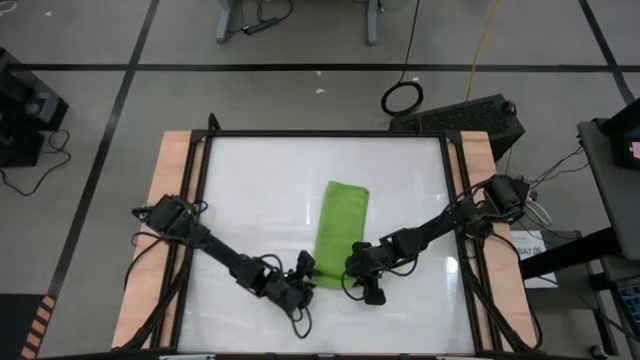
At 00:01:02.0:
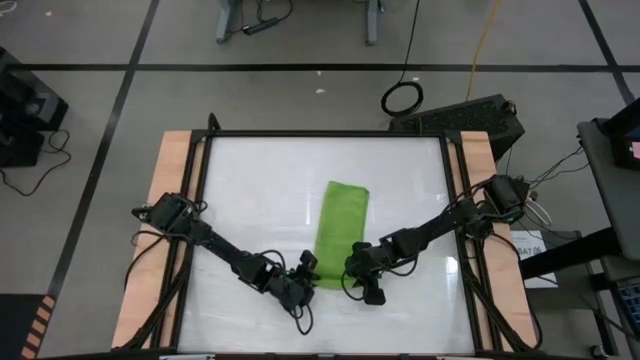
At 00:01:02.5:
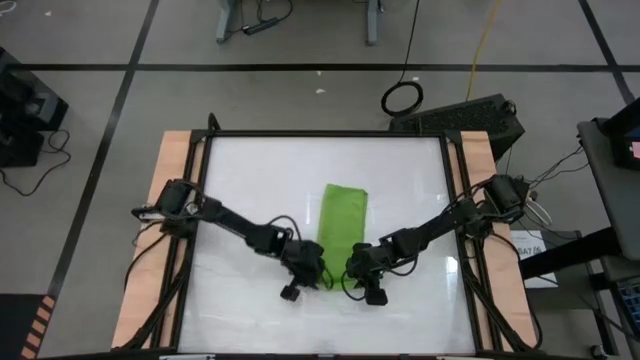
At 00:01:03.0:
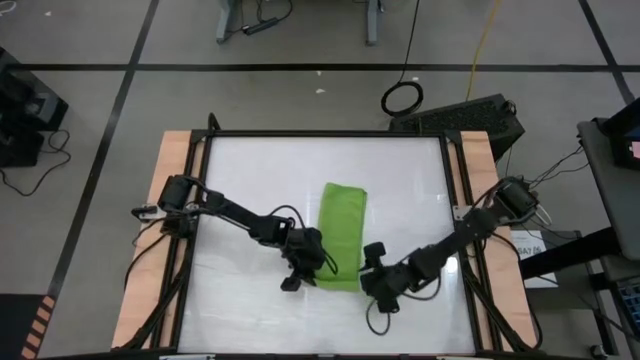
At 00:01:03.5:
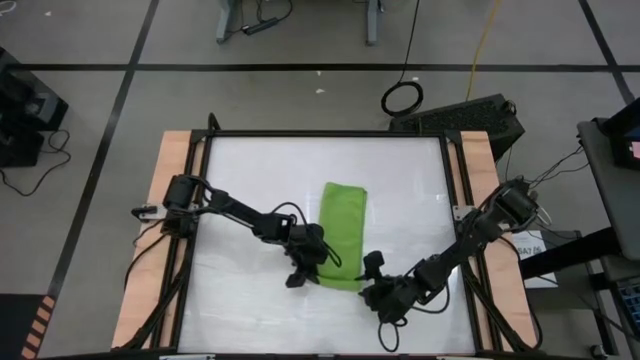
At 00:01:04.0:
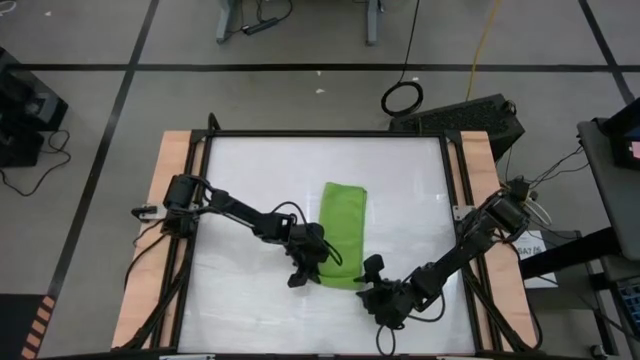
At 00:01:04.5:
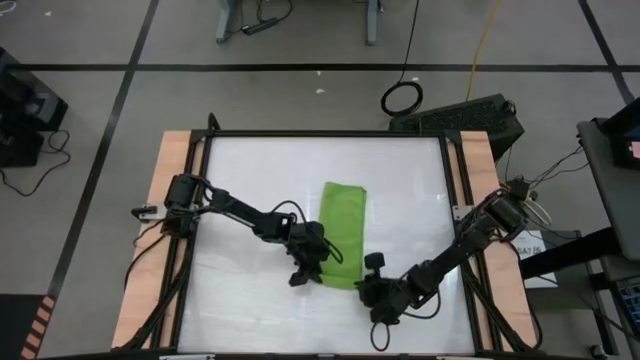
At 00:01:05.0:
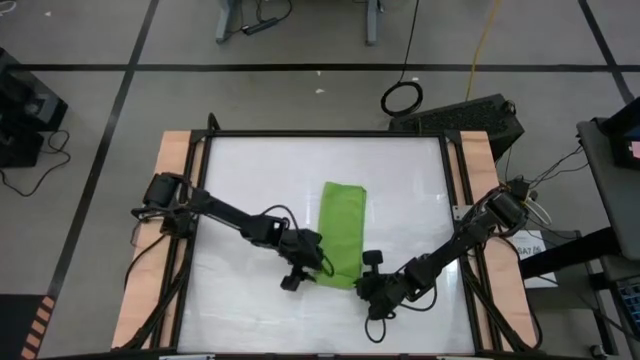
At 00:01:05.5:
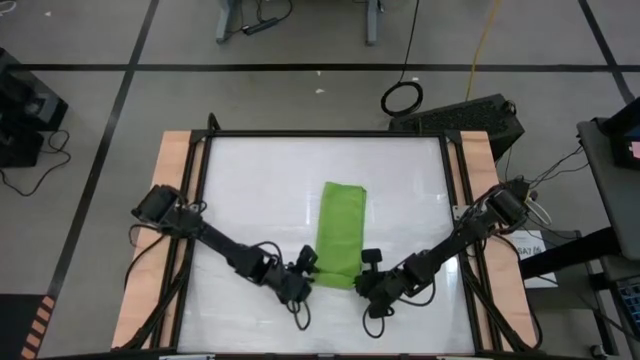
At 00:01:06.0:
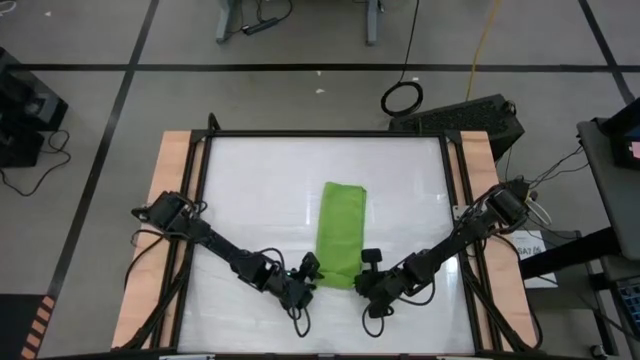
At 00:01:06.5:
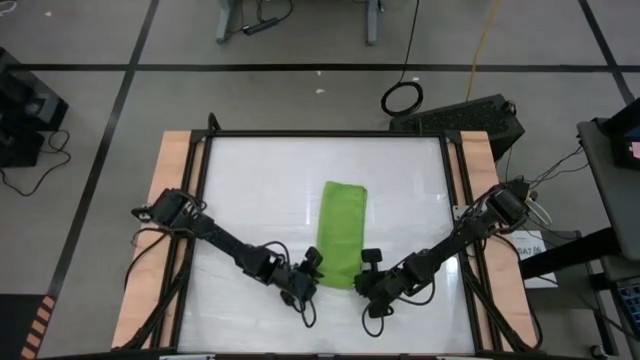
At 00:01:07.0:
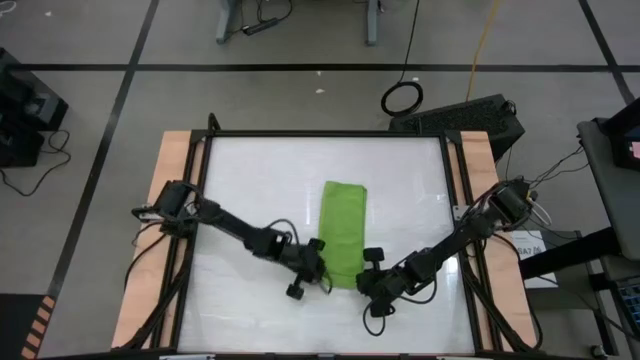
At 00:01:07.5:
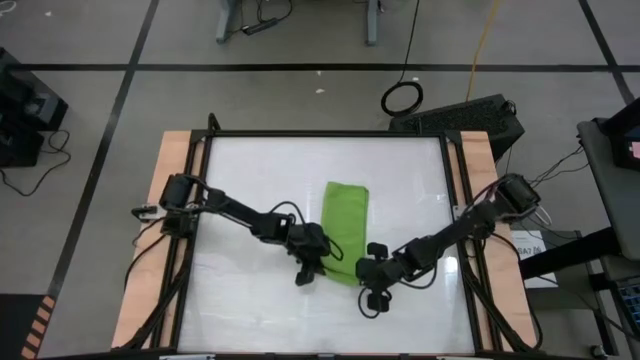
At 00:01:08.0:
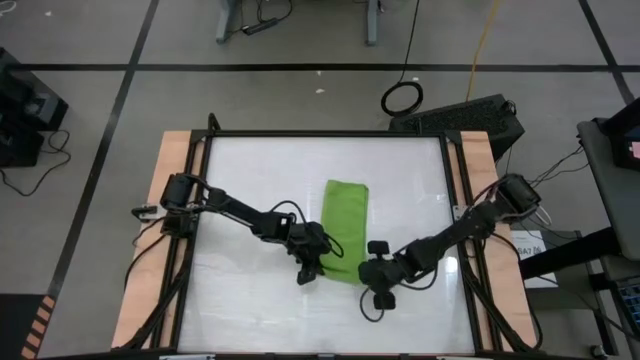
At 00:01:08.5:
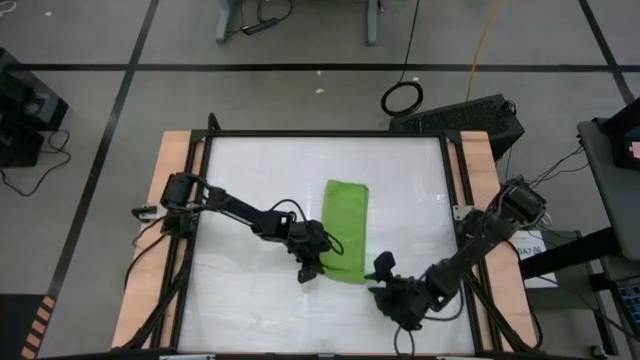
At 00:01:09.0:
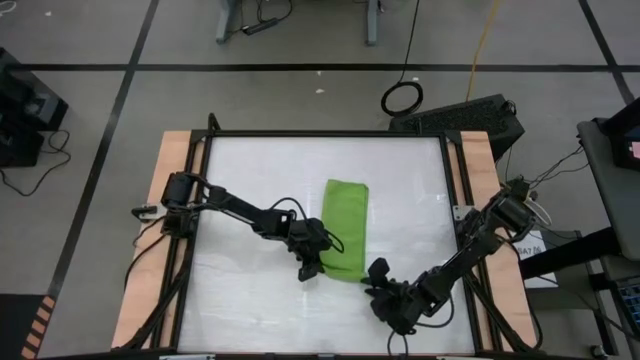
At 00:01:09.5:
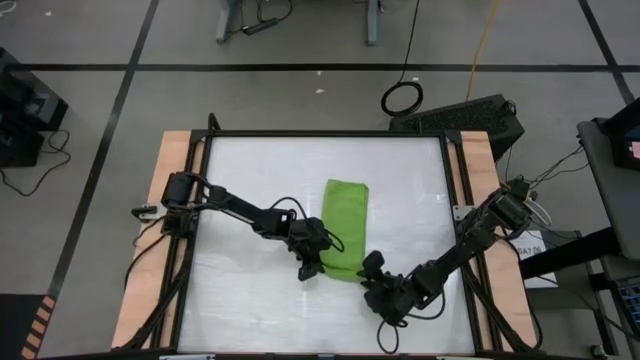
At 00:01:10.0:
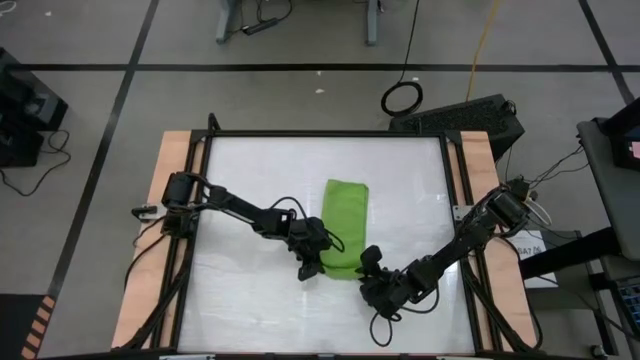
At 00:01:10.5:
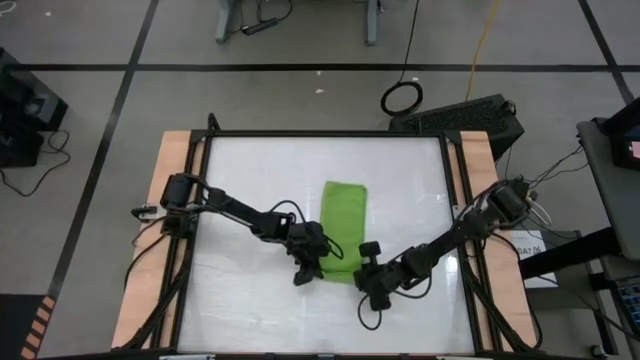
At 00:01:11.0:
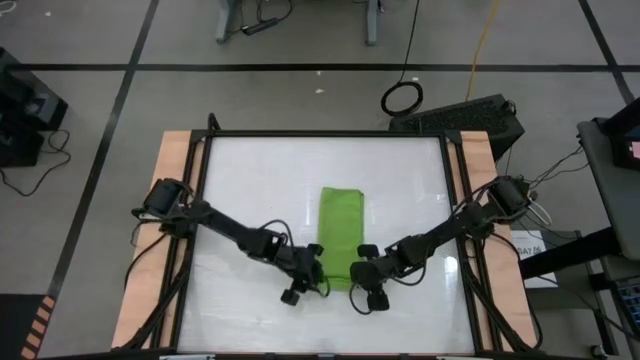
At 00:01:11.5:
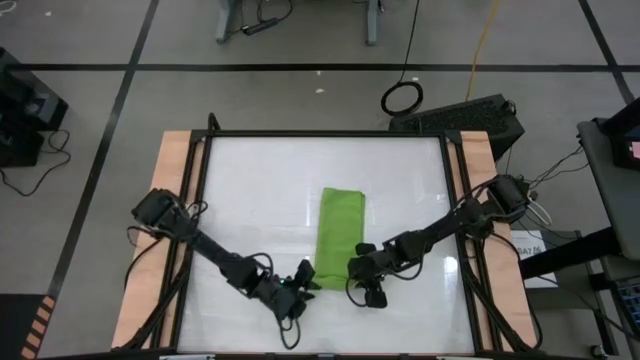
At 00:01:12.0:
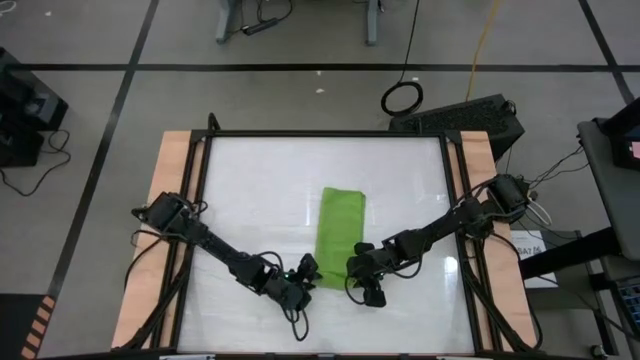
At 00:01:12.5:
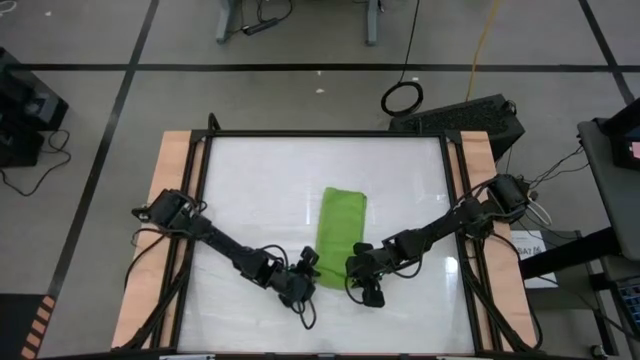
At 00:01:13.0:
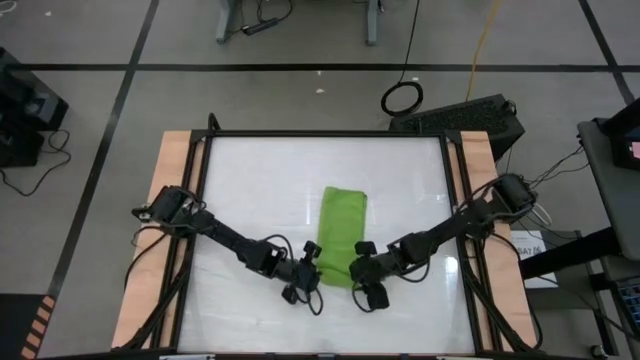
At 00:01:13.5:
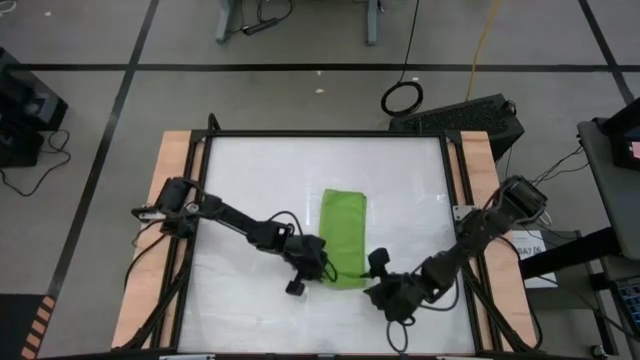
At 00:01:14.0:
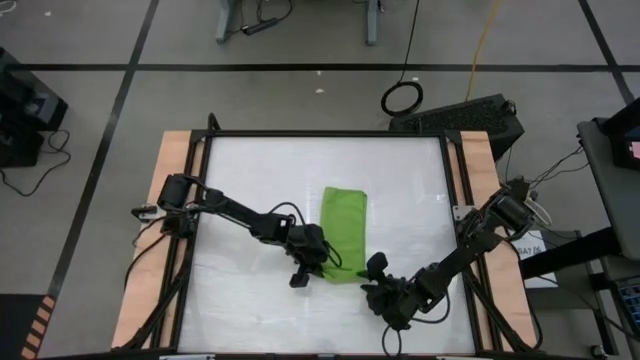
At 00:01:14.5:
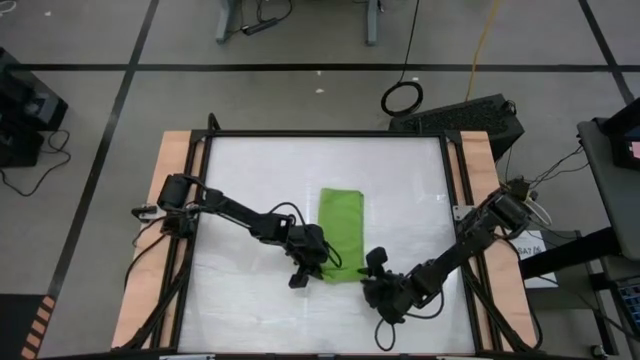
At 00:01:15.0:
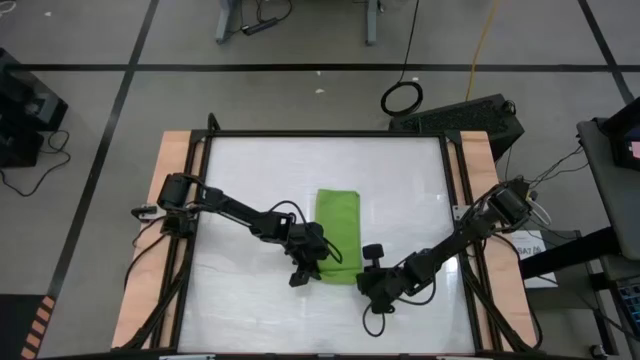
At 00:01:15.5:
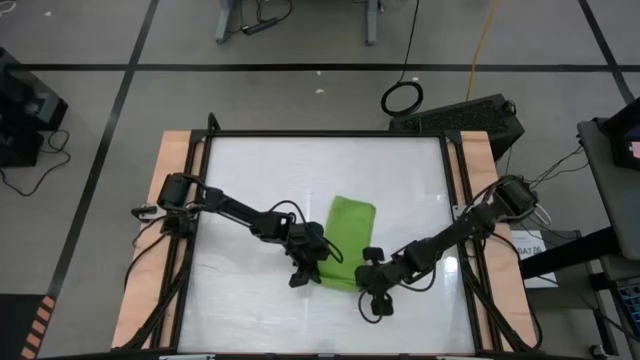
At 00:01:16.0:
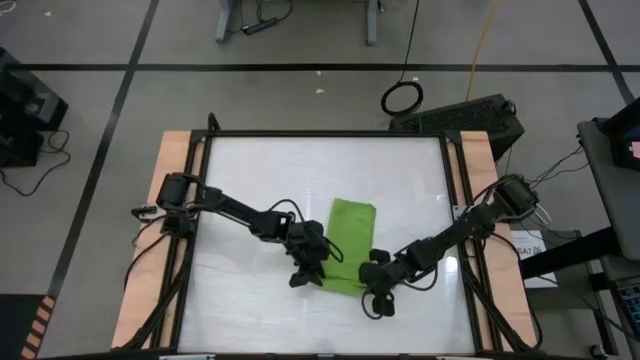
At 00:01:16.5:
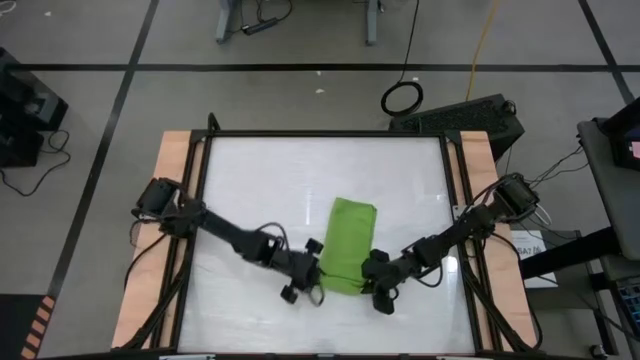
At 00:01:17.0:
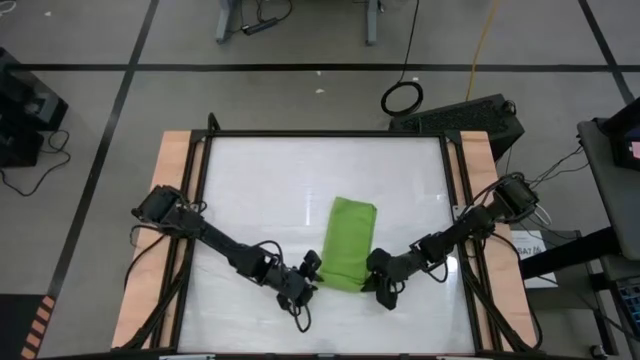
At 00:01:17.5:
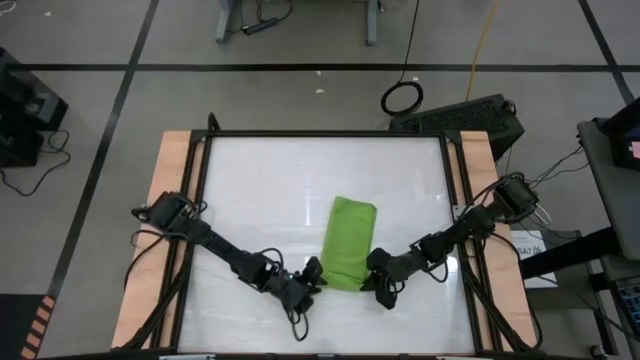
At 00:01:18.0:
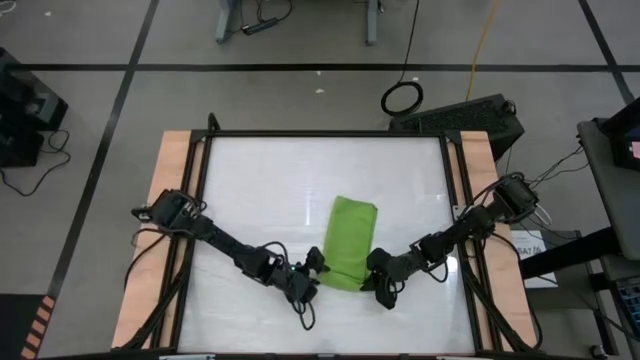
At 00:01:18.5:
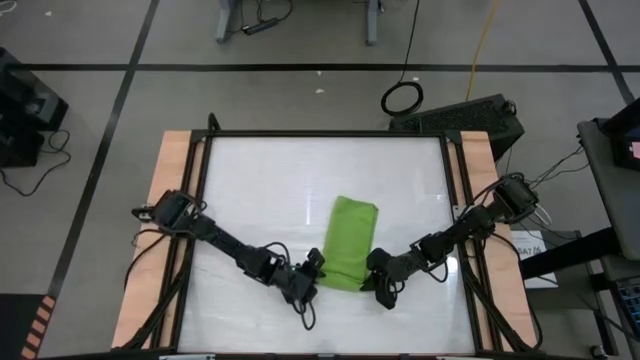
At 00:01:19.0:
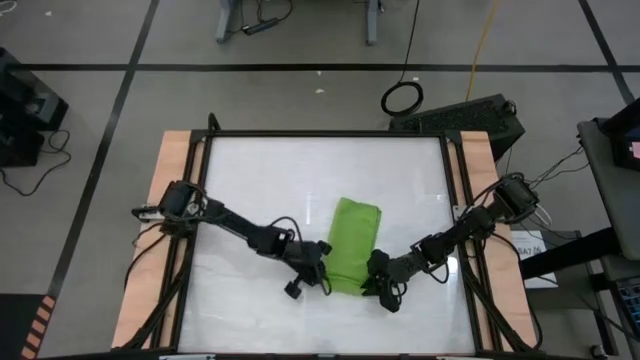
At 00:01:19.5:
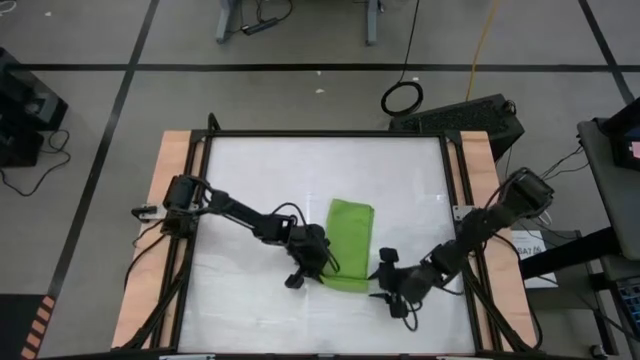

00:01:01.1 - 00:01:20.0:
Task: Roll towel
Roll the green towel on the table

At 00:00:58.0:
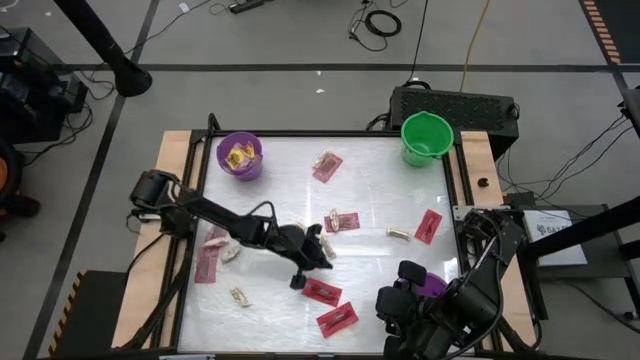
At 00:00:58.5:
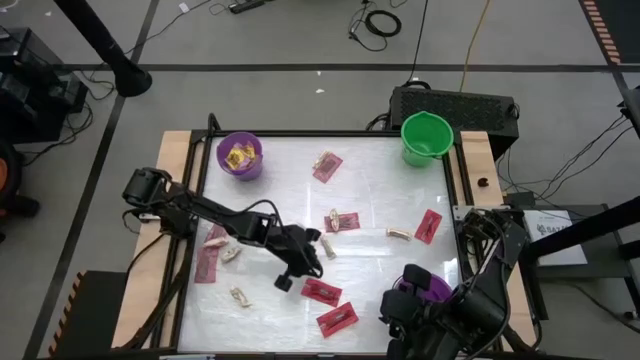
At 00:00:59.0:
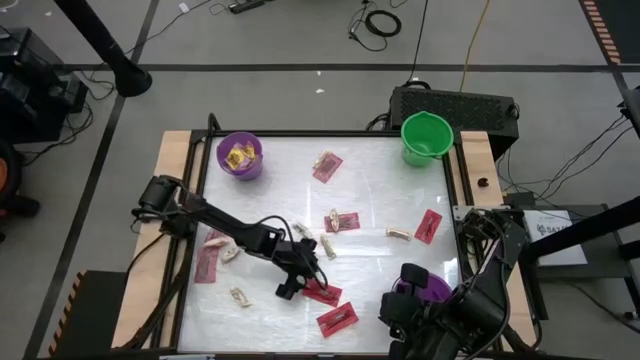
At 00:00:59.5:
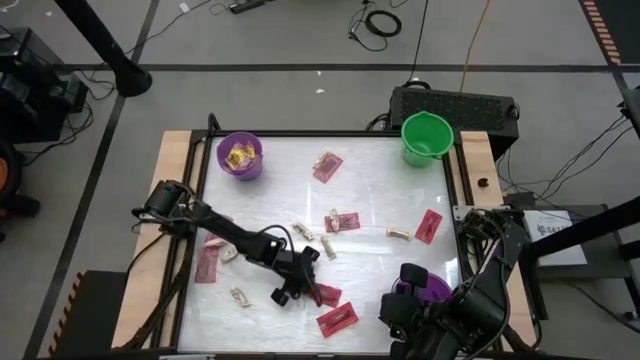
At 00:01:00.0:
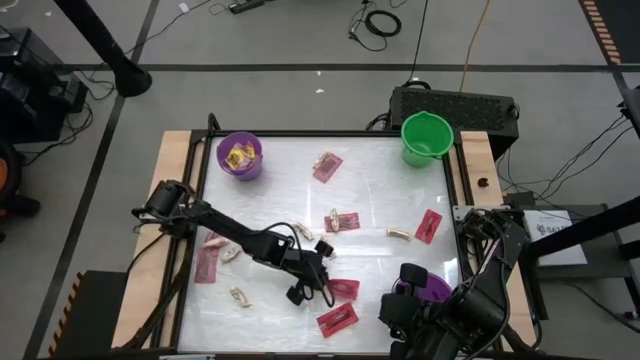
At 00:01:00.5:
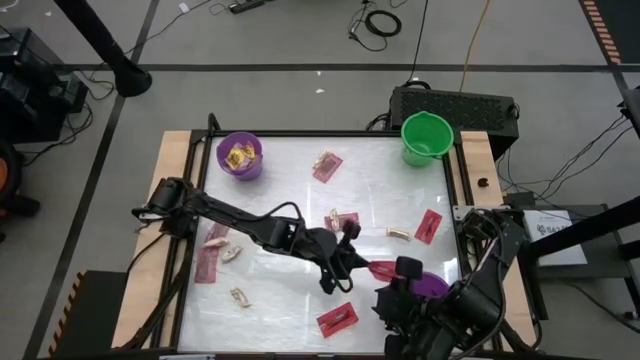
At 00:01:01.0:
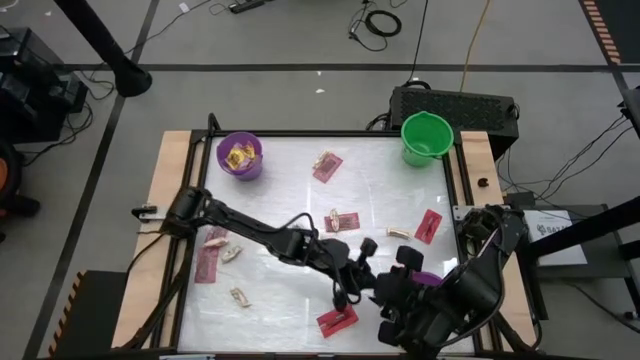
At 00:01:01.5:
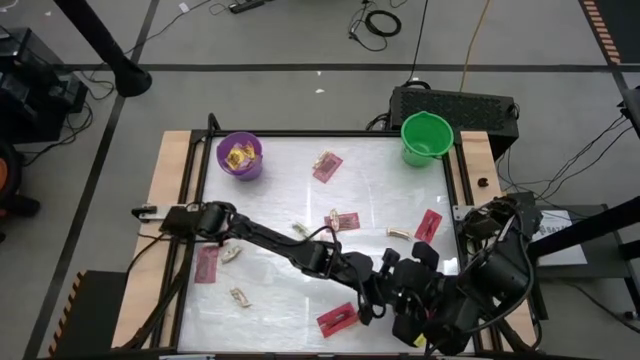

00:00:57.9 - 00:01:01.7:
Task: Sort candy by brand, put in halloween buckets
Put the red candy into the bottom violet bucket
